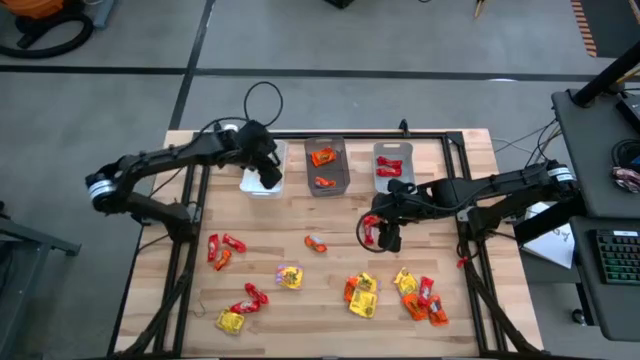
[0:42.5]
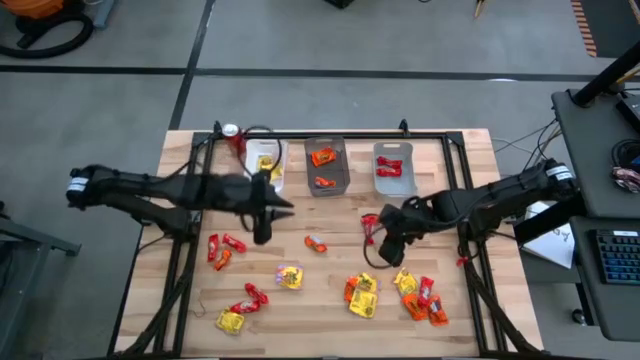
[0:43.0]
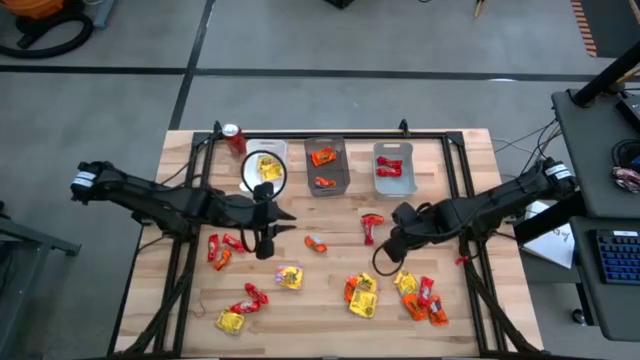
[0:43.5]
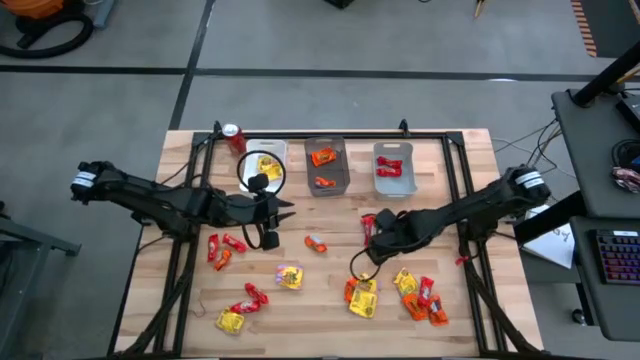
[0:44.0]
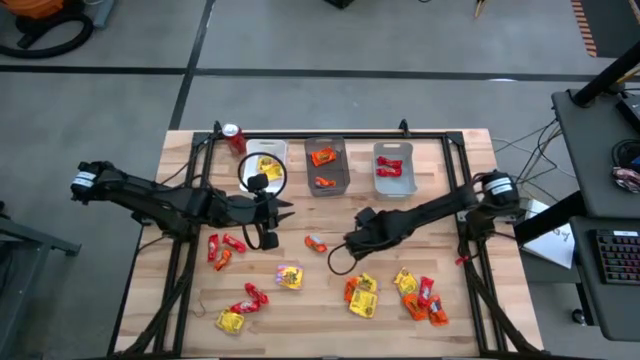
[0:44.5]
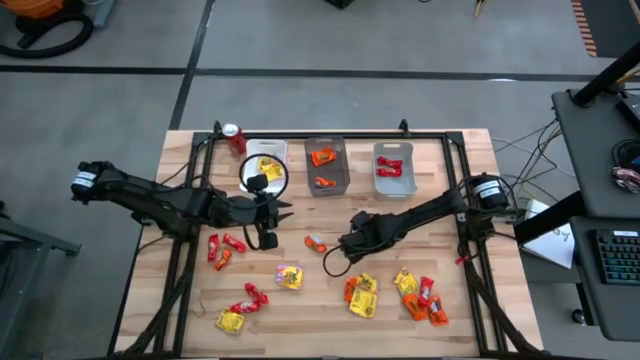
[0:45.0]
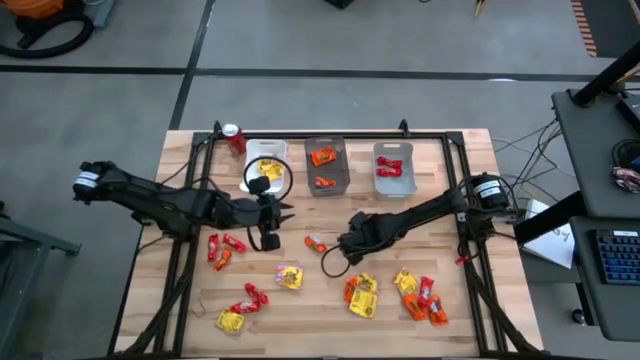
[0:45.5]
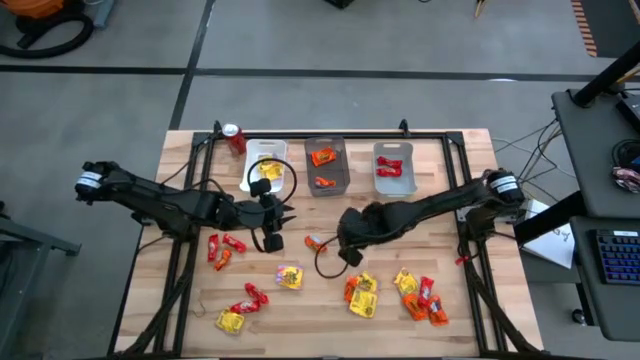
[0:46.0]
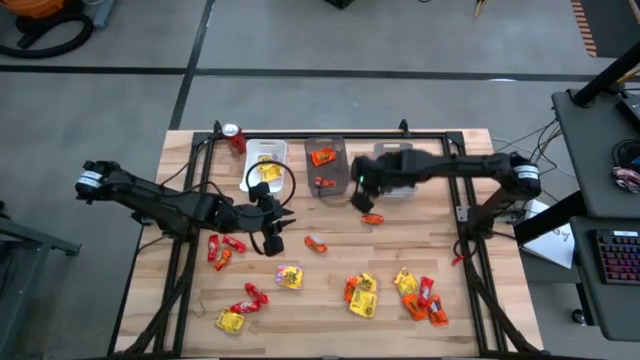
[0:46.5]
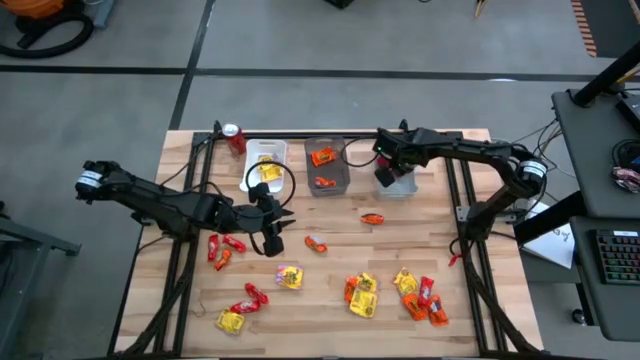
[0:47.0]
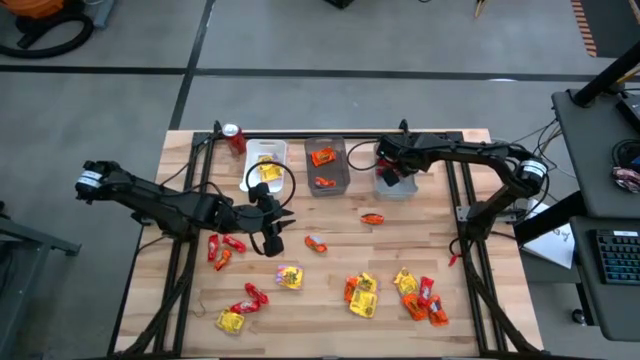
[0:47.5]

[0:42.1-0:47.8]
Task: Sort candy
Put the red chocolate into the gray bin

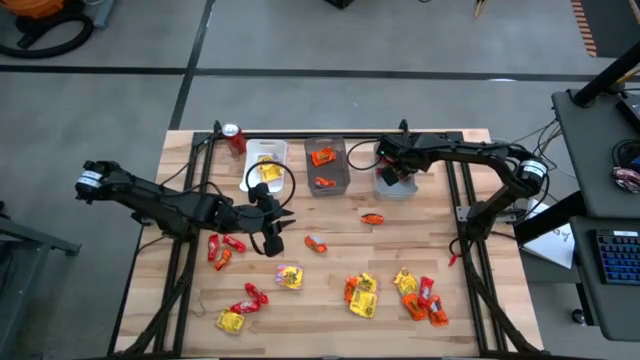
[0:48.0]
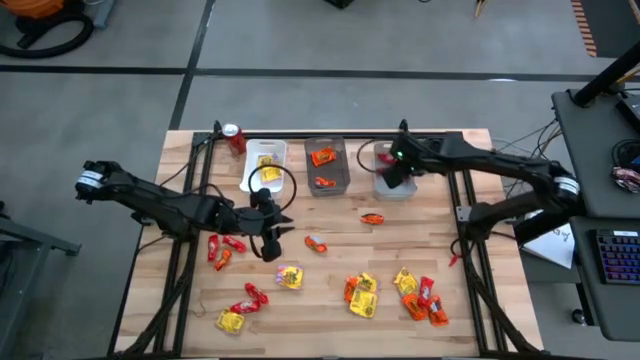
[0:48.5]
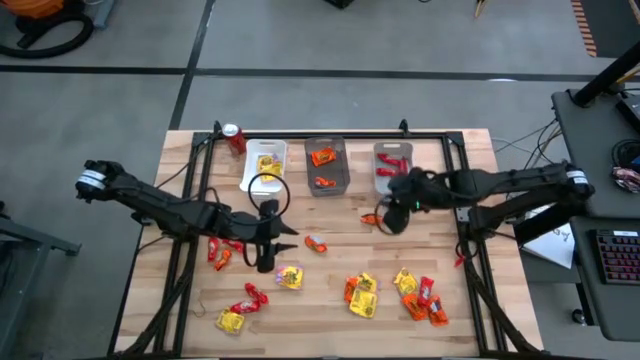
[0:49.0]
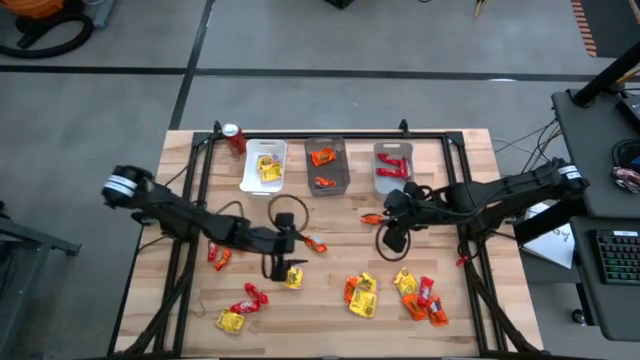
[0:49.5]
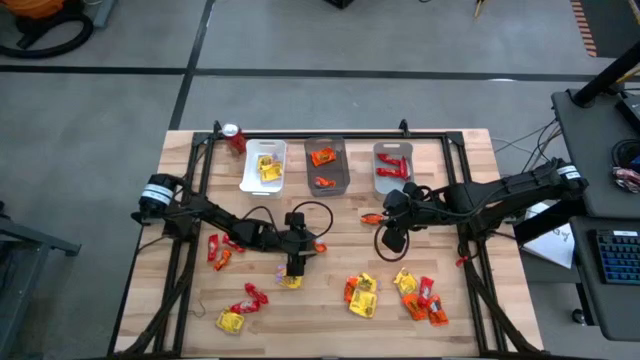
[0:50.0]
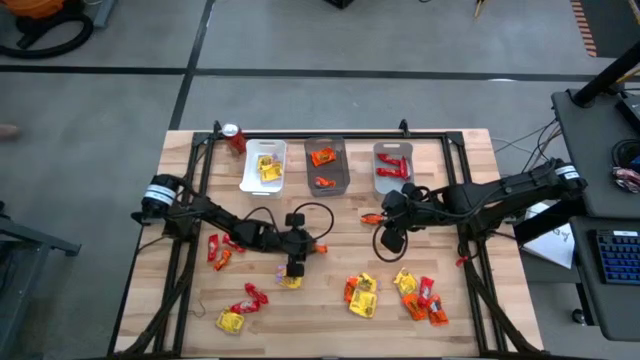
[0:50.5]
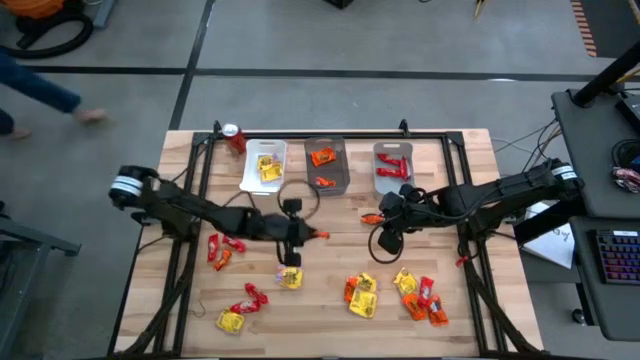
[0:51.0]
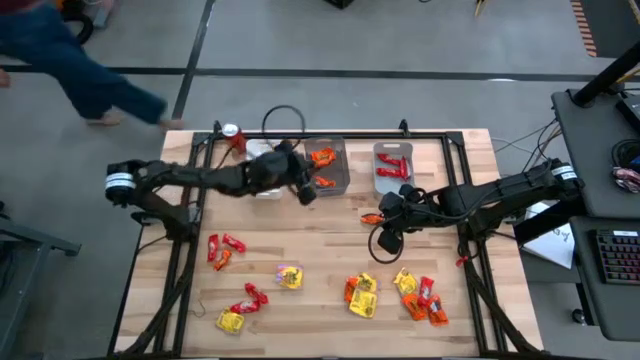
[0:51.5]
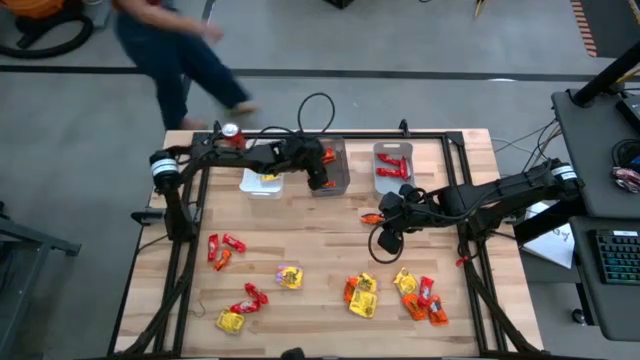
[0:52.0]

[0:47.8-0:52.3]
Put the orange chocolate into the black bin

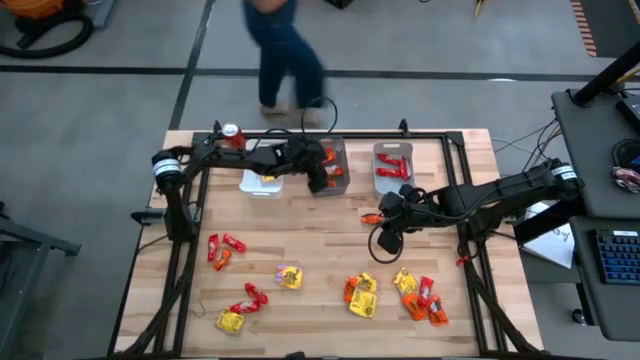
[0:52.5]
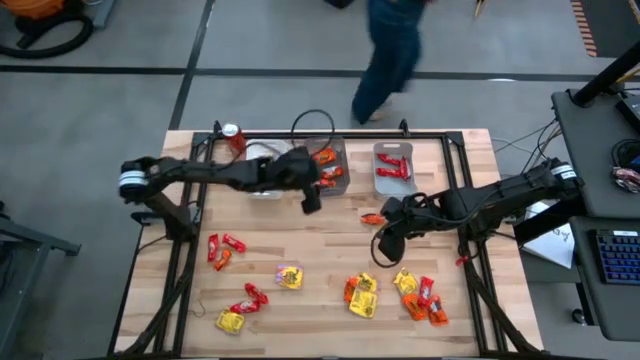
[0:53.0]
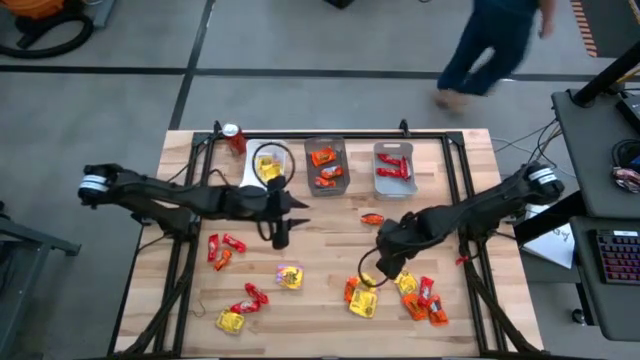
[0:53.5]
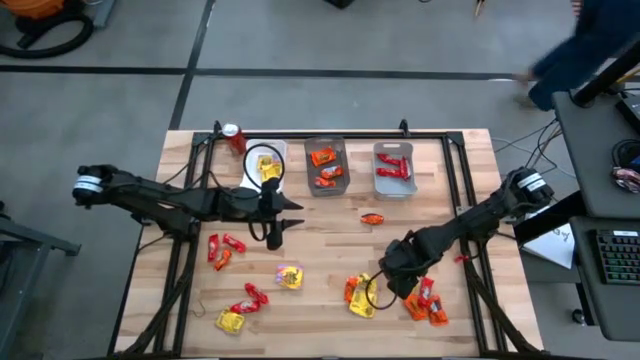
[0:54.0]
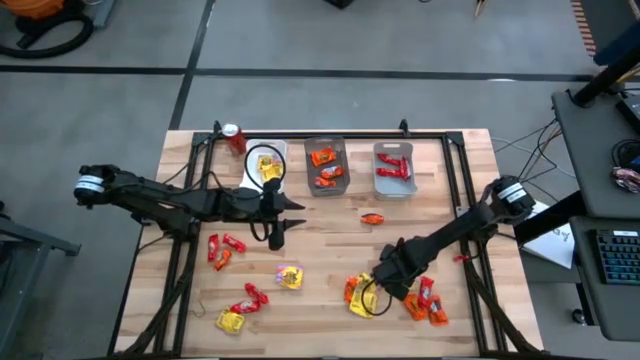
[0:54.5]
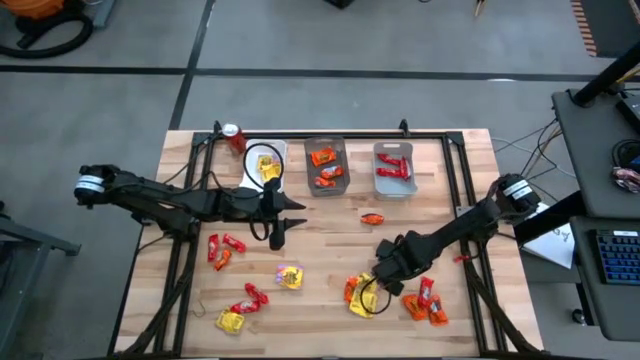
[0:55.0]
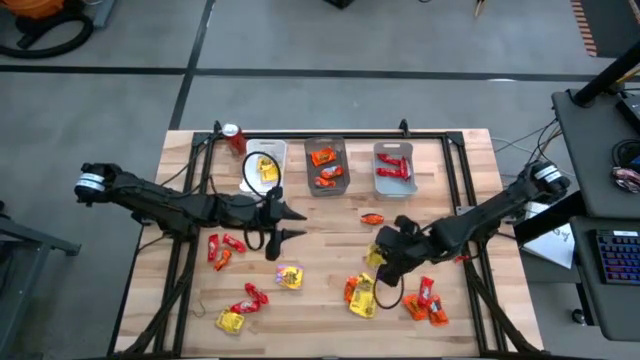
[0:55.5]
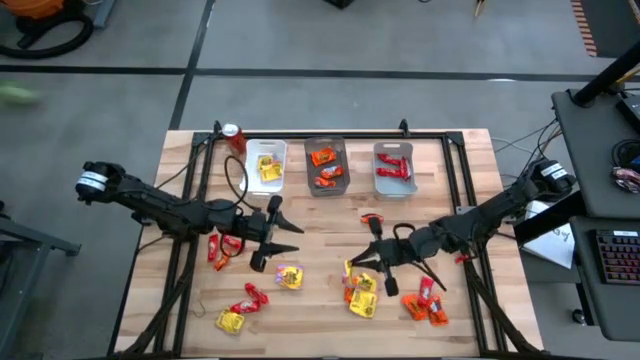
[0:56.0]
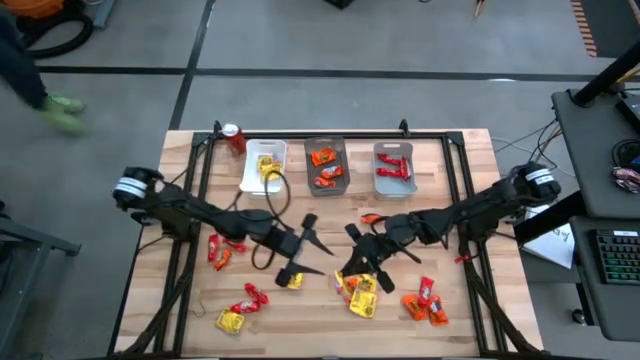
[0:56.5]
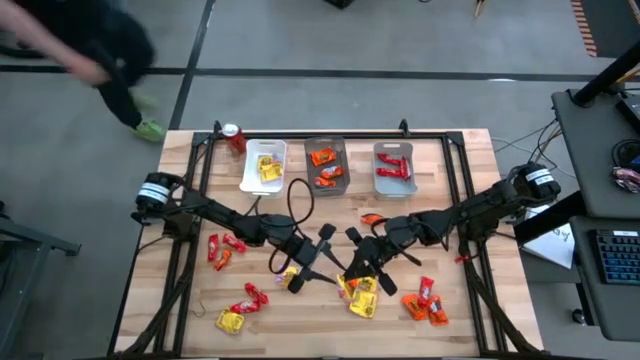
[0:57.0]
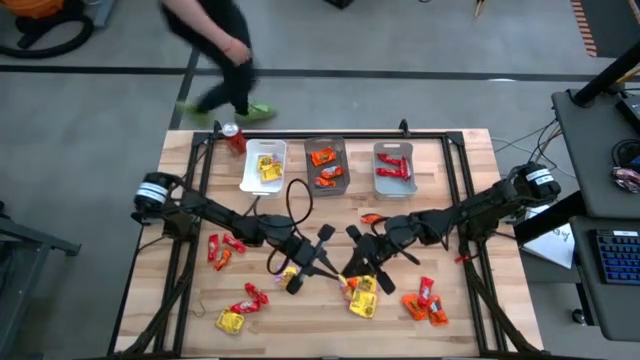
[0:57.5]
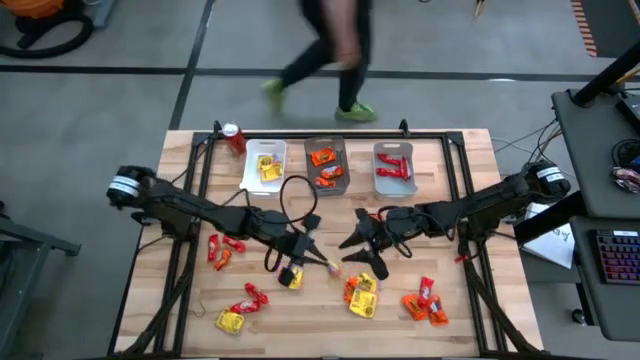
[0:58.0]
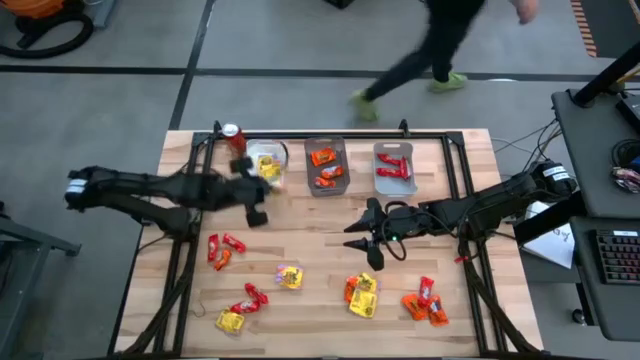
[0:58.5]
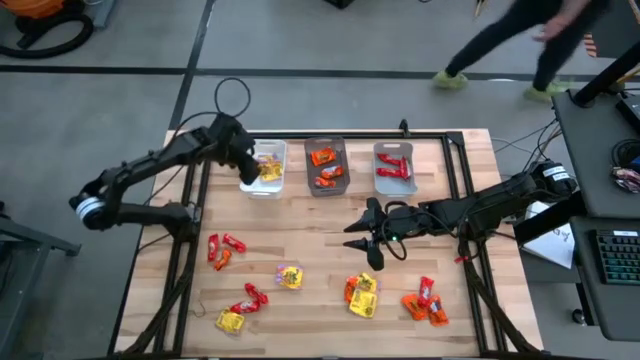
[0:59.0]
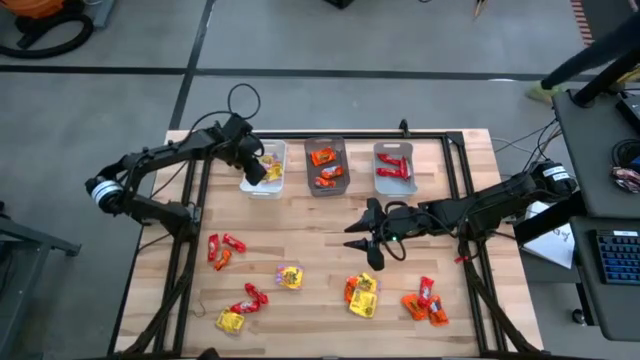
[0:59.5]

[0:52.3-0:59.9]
Put the yellow candy into the white bin

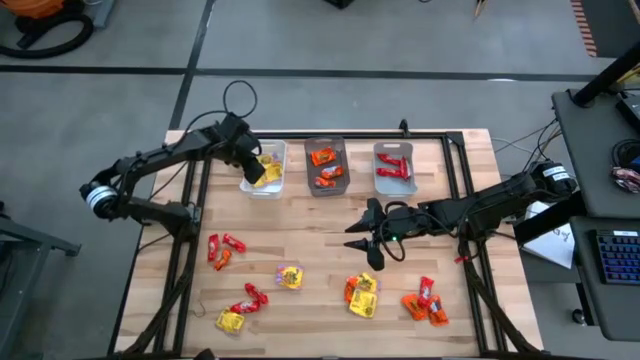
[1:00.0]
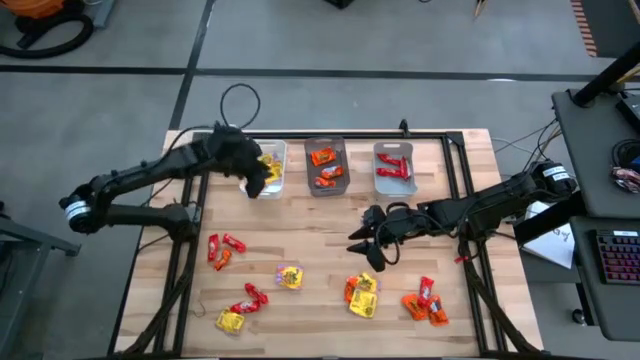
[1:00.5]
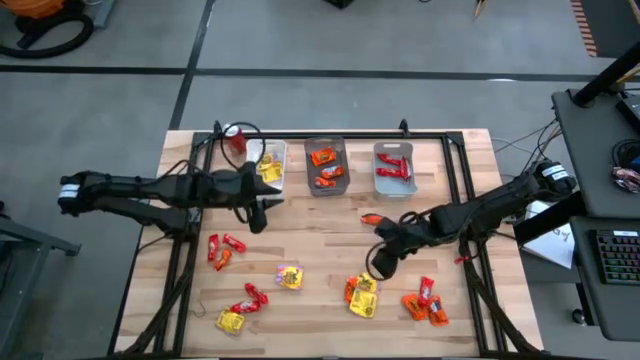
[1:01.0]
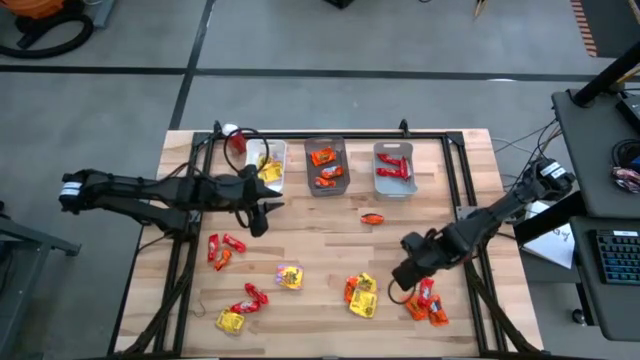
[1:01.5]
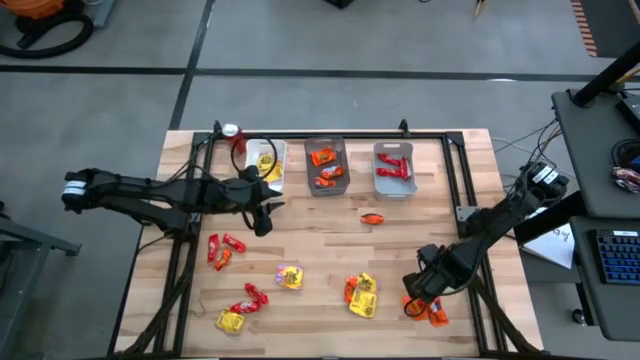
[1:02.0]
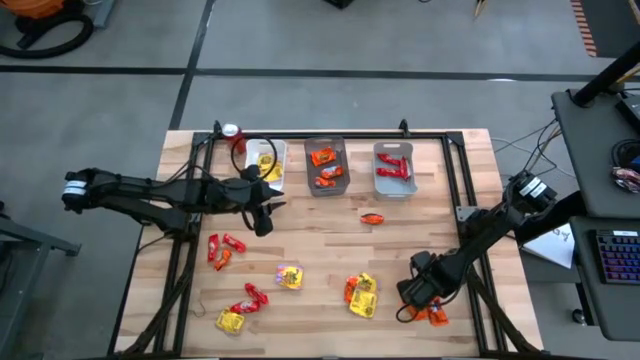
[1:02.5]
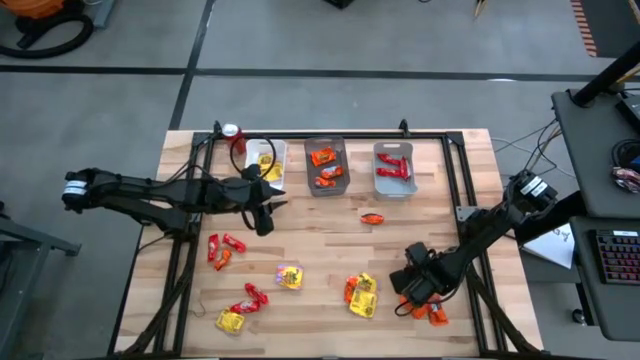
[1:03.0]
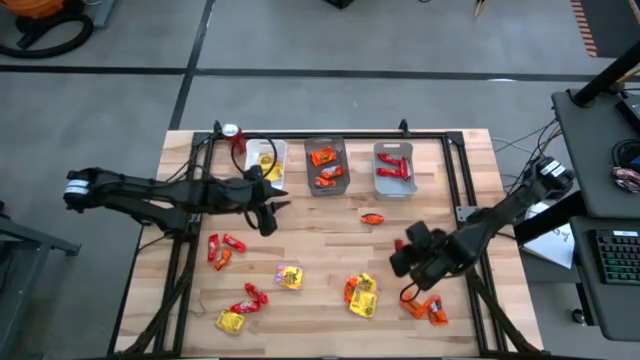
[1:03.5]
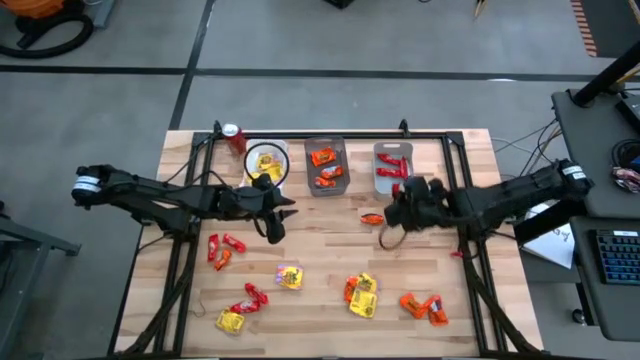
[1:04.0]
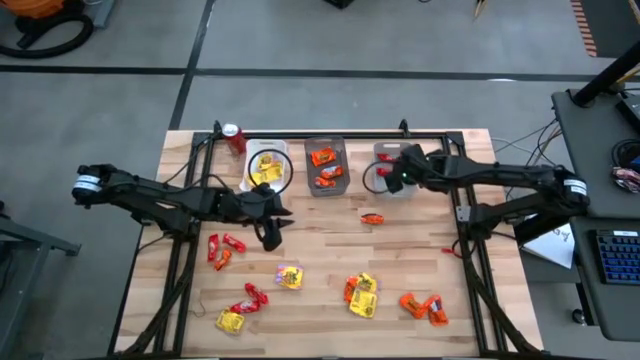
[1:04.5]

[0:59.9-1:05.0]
Put the red chocolate into the gray bin
